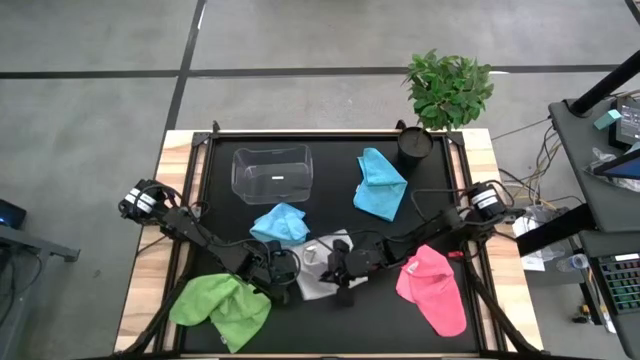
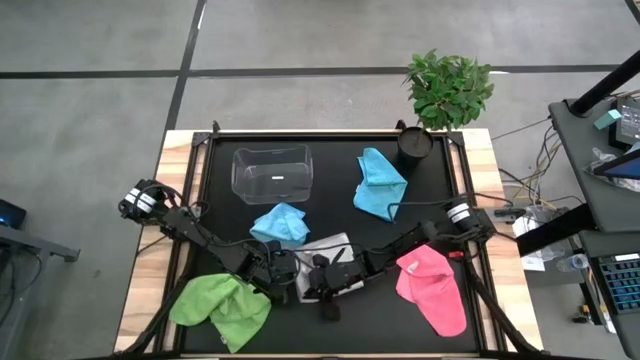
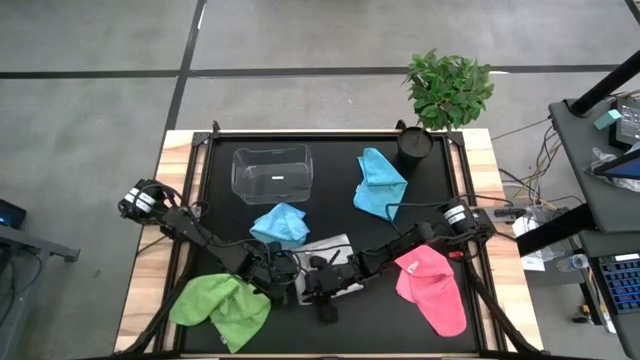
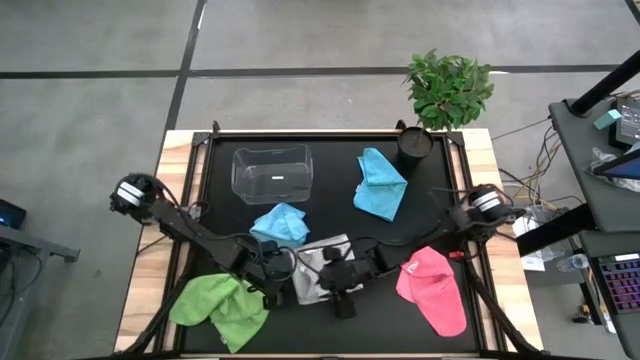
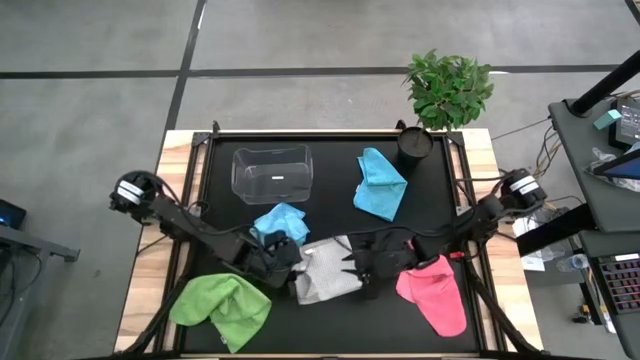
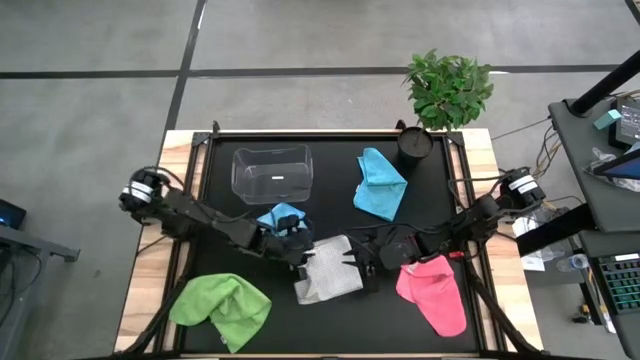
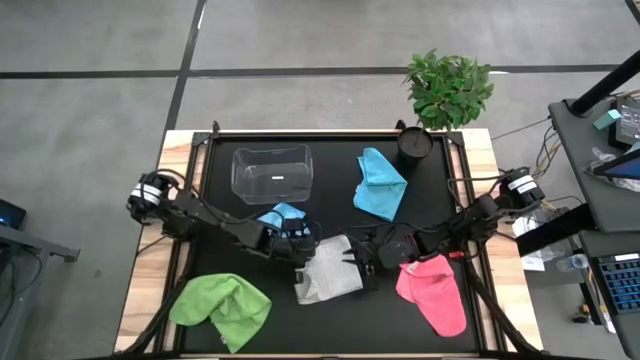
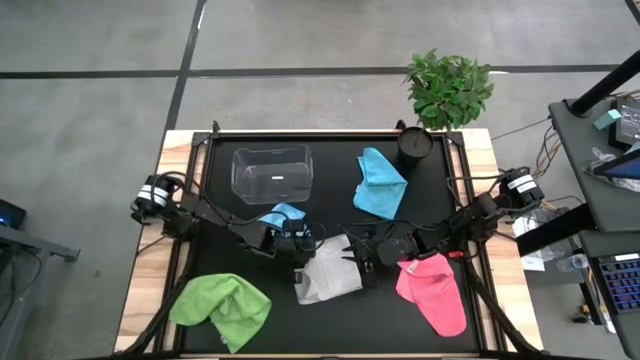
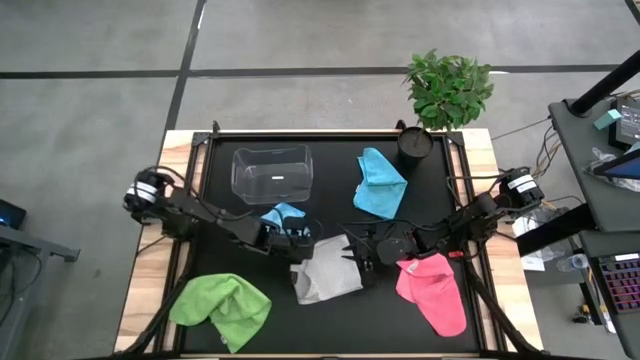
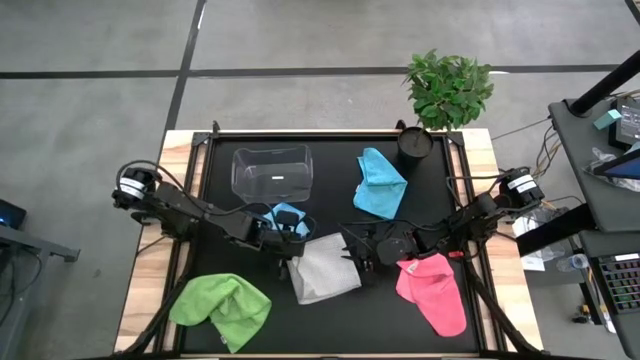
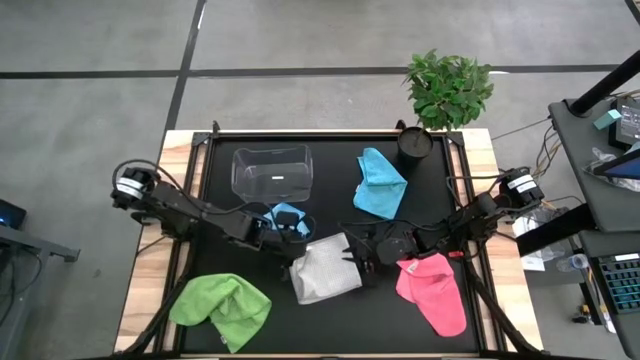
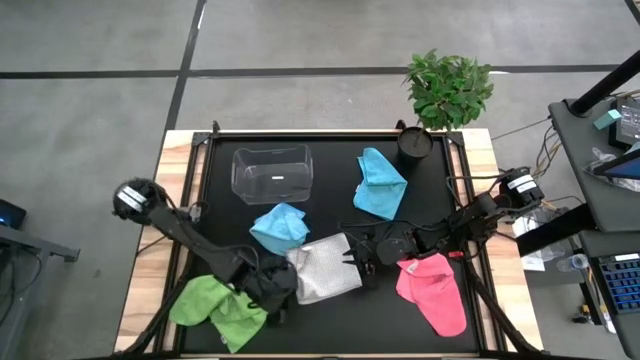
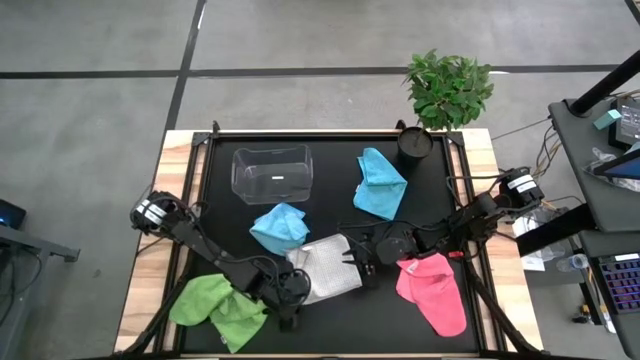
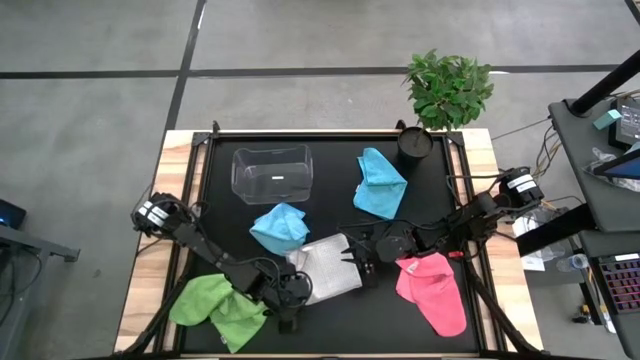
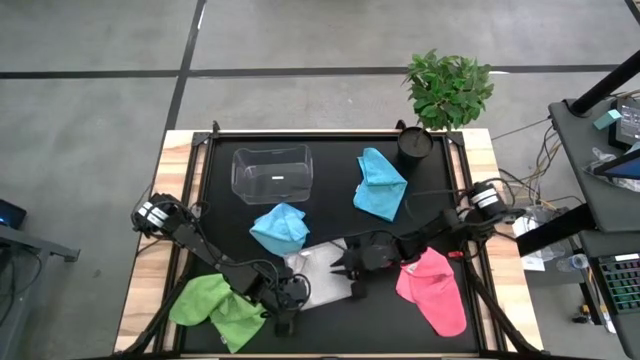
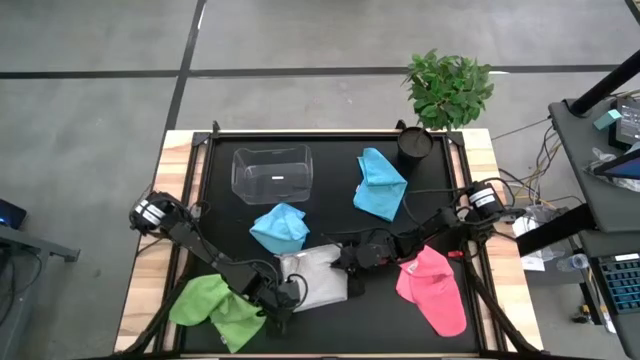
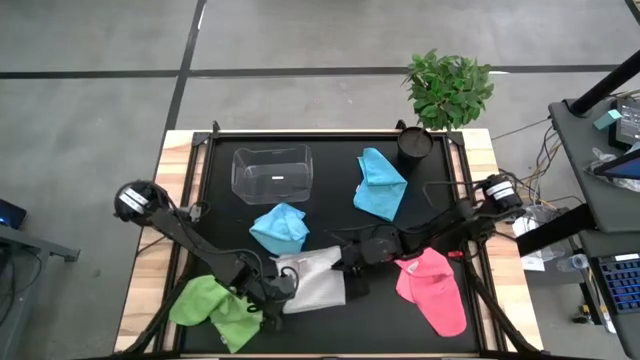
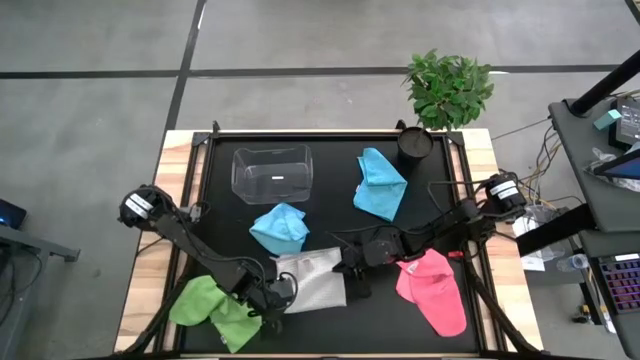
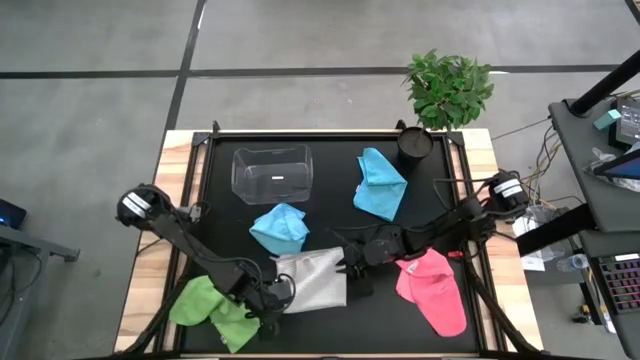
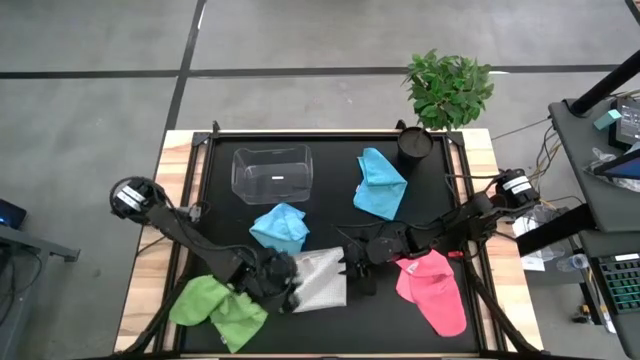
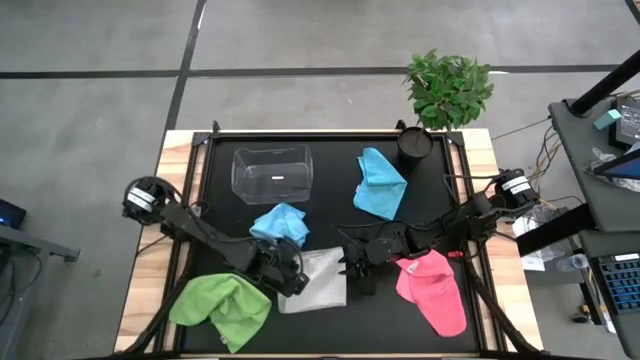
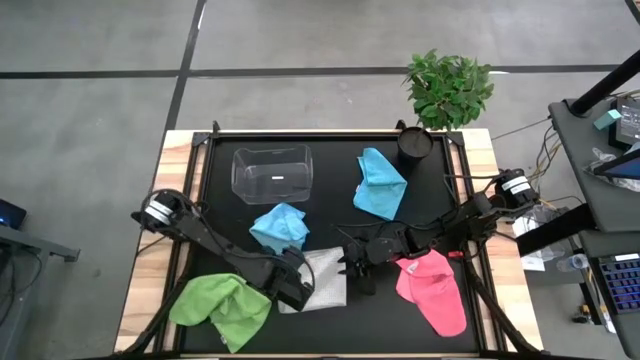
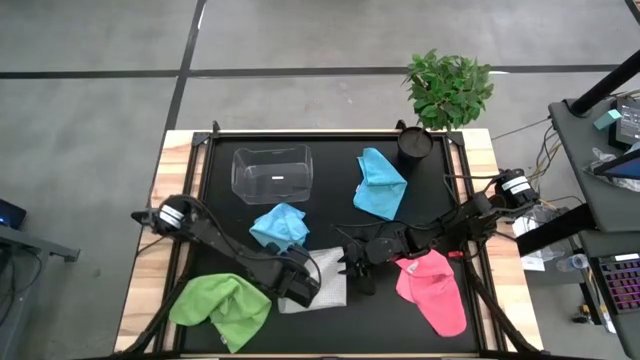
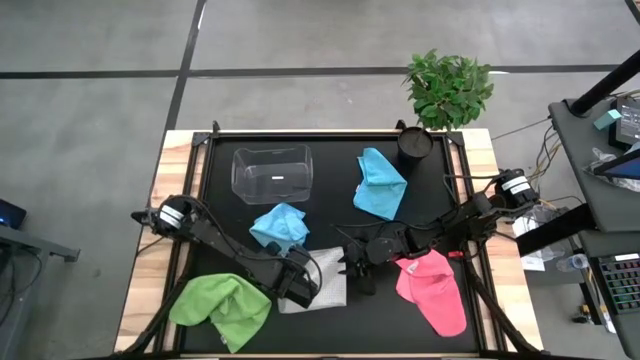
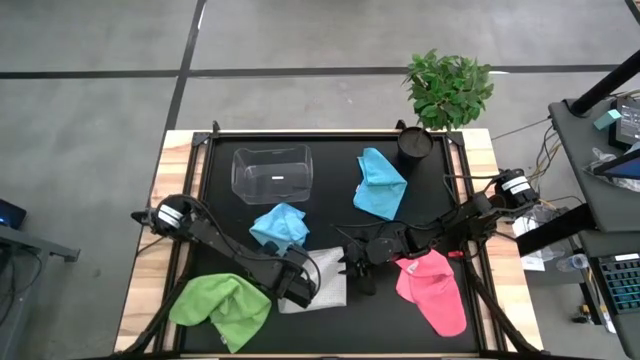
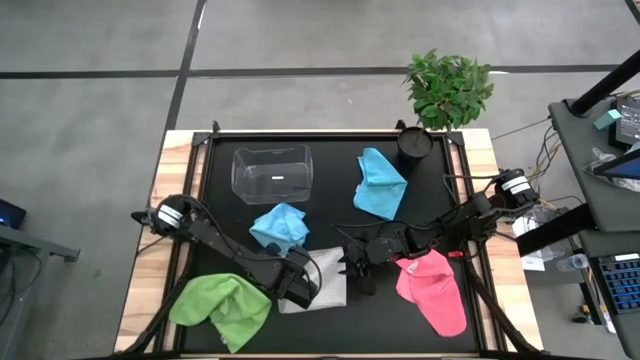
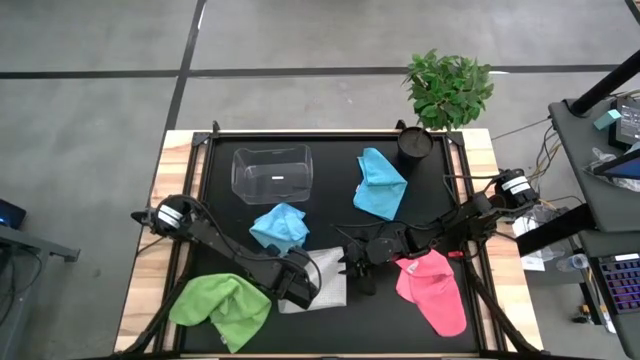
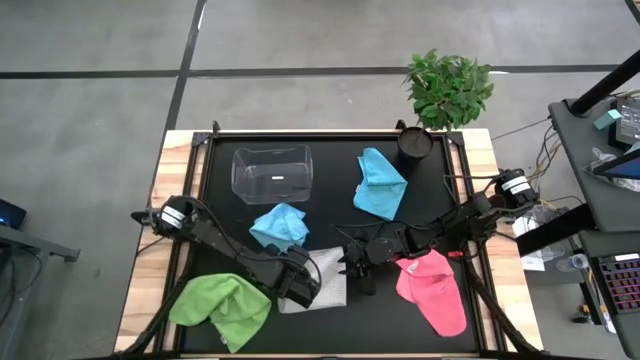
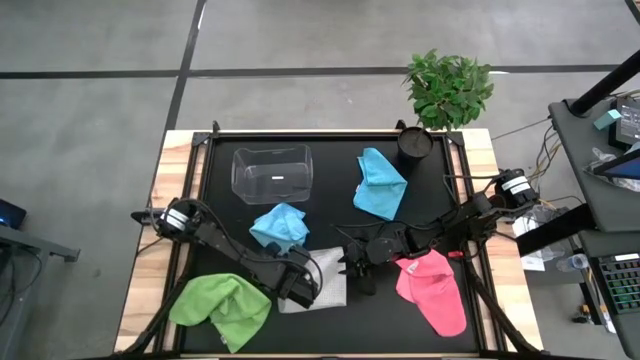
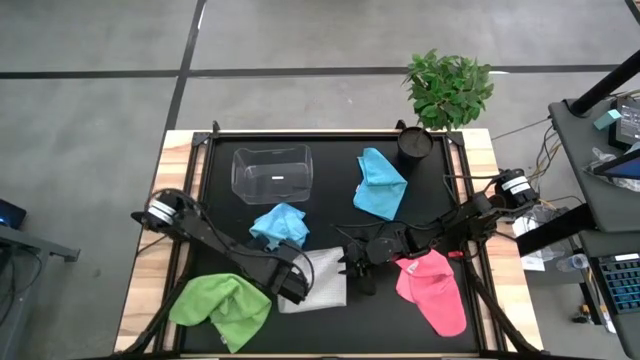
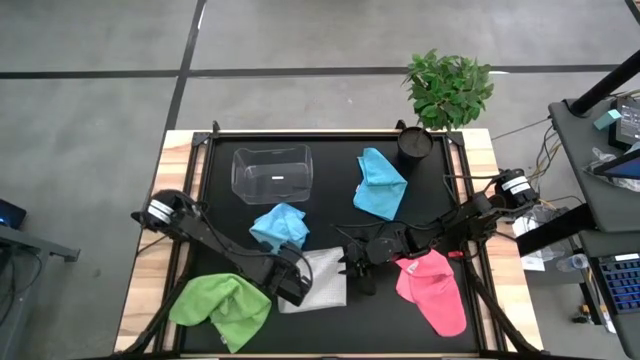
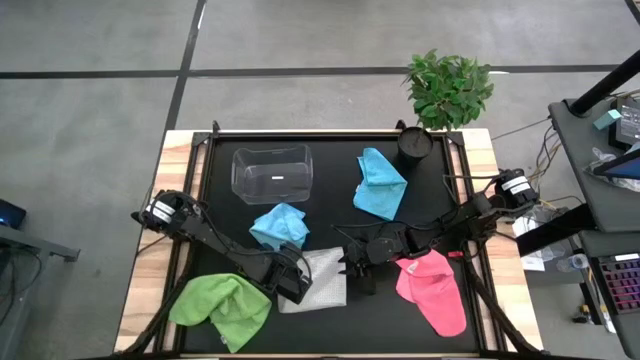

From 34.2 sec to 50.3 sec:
Task: Fold microfiber towels
Fold the gray microfiber cloth

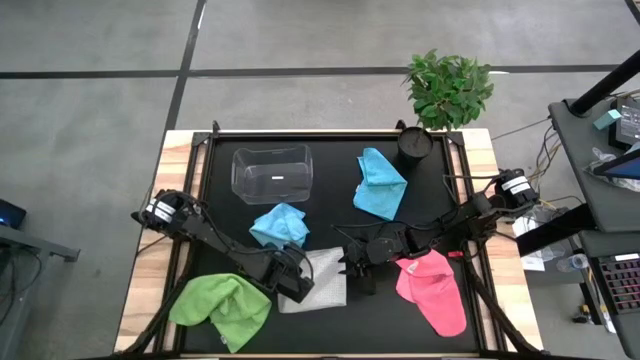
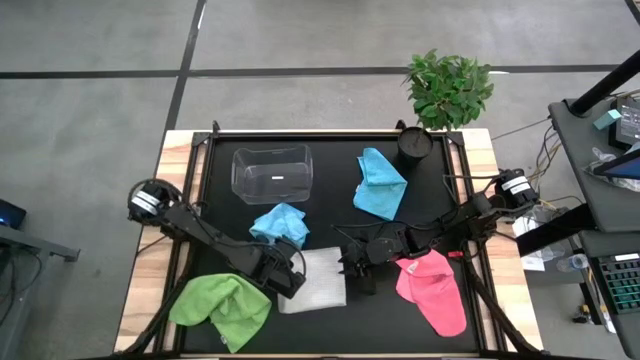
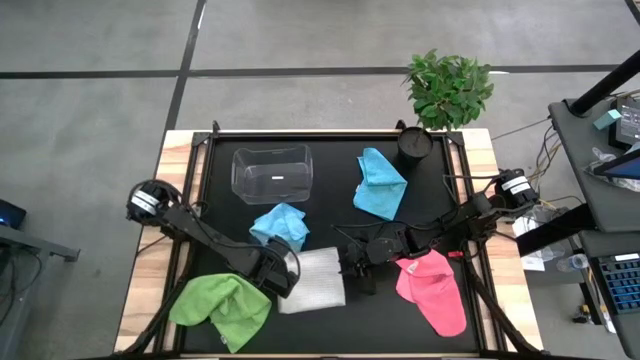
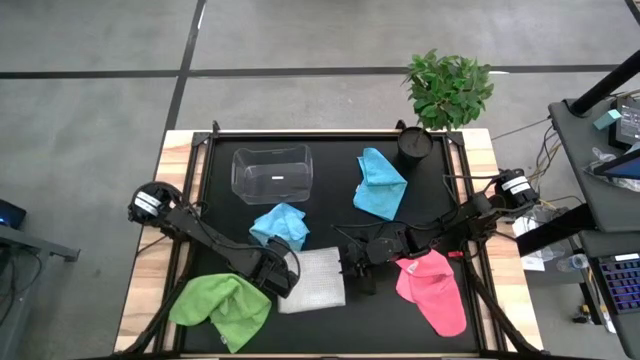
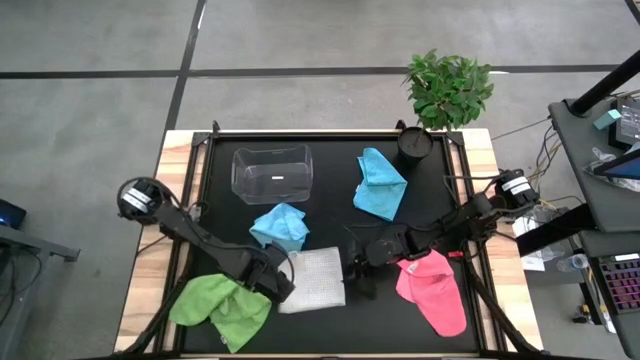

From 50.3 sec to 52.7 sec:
Fold the gray microfiber cloth

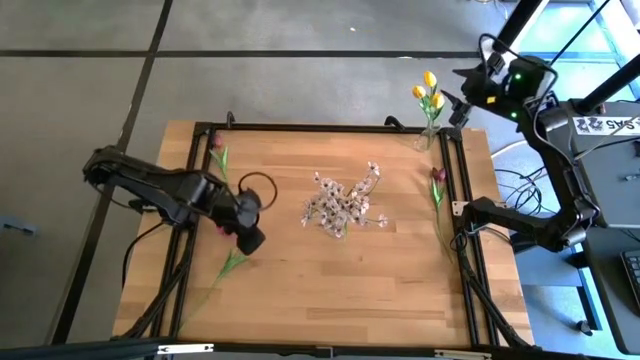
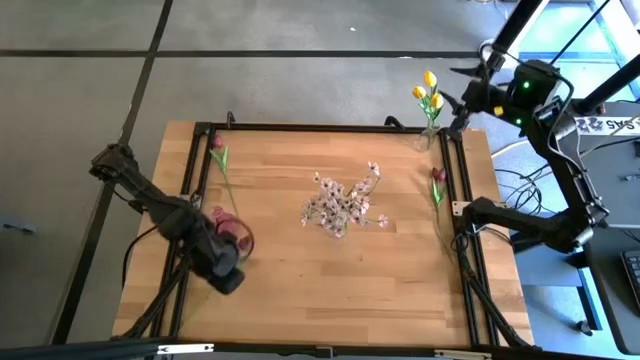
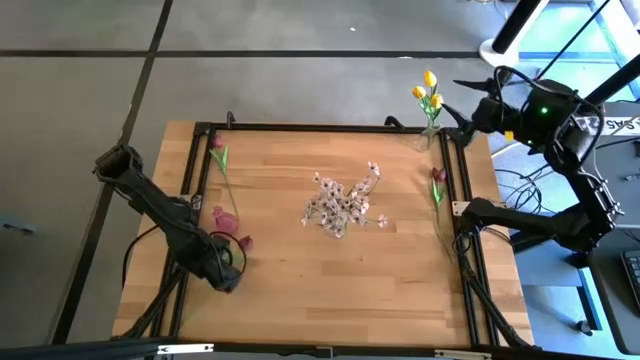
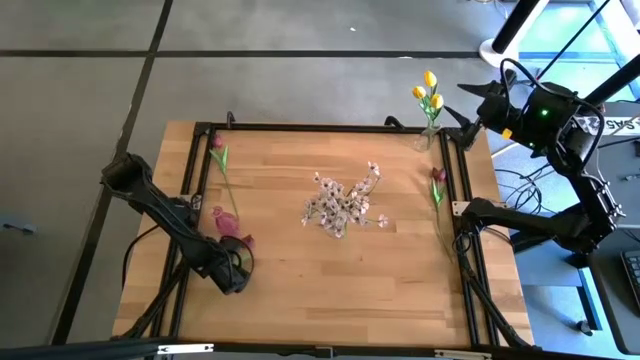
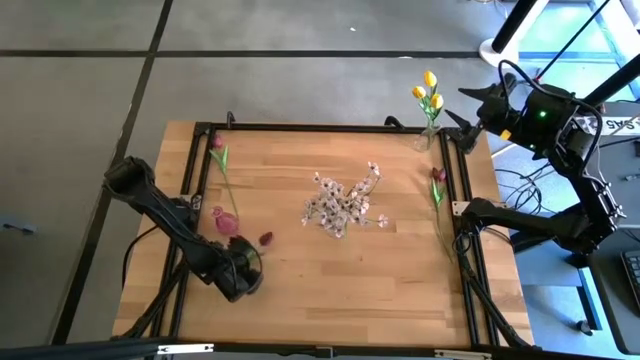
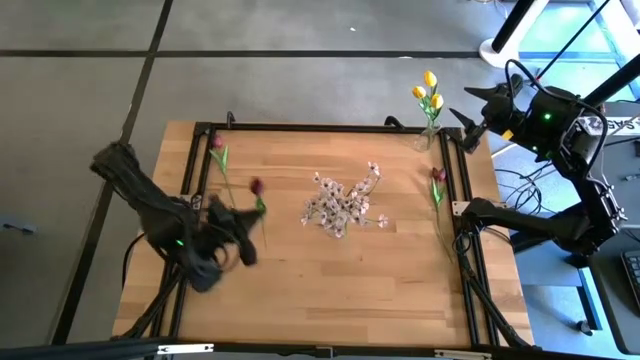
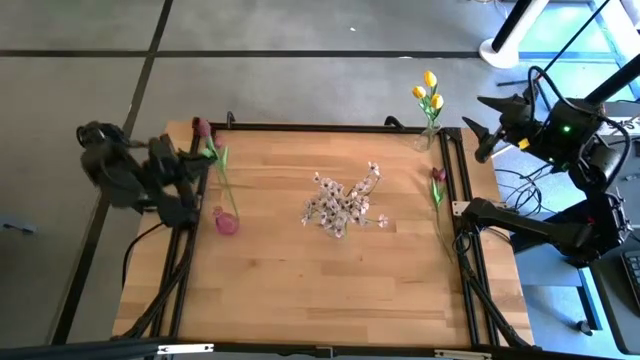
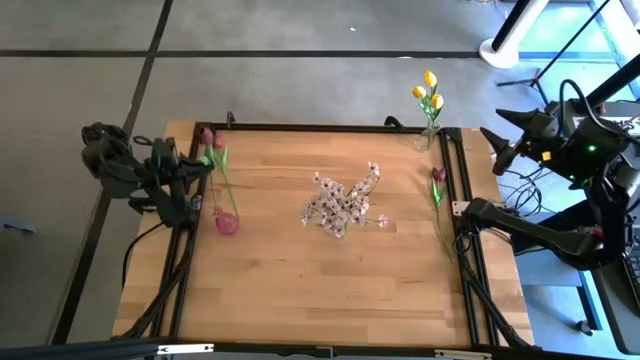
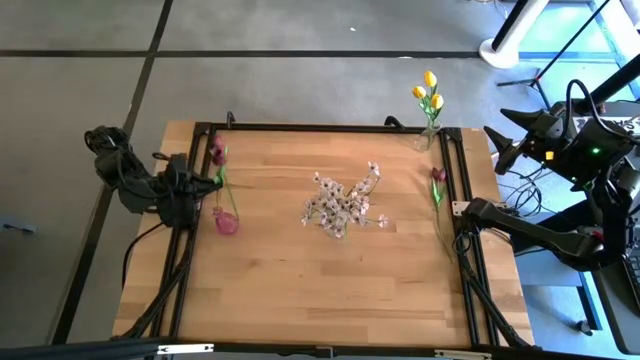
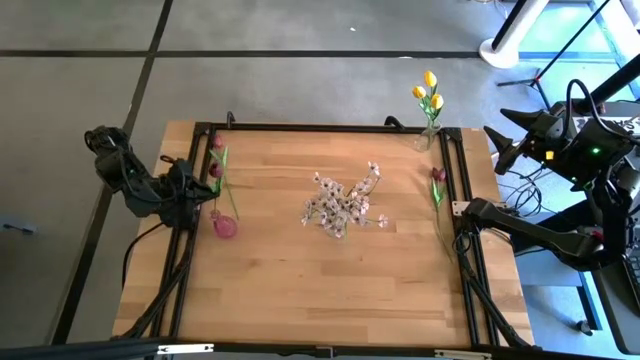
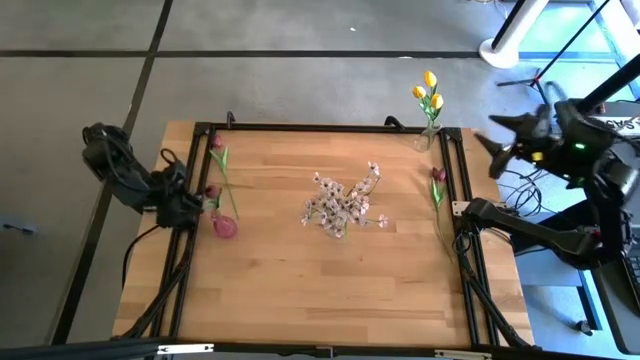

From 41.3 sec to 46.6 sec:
Task: Sort flowers into vase by color
Put the bottom left red tulip into the violet vase
